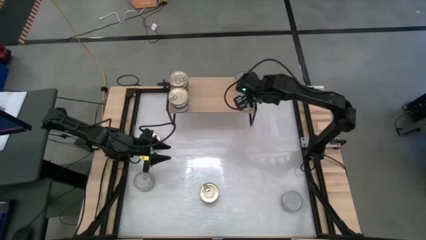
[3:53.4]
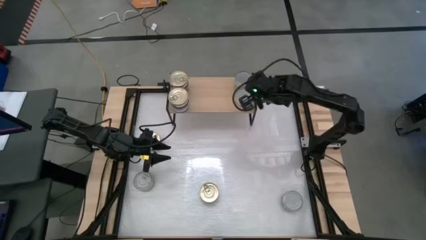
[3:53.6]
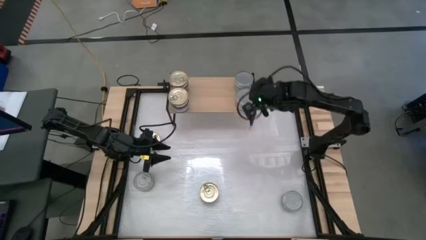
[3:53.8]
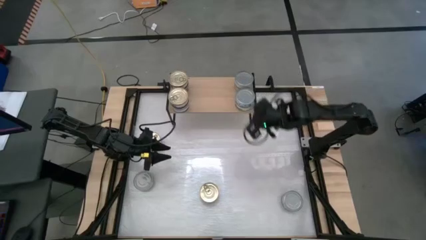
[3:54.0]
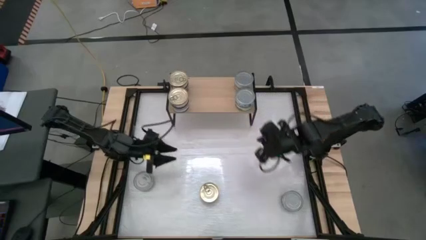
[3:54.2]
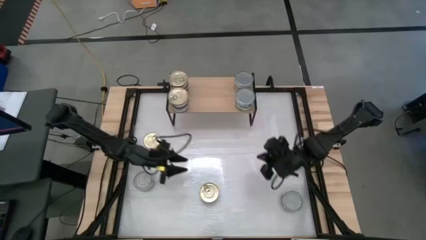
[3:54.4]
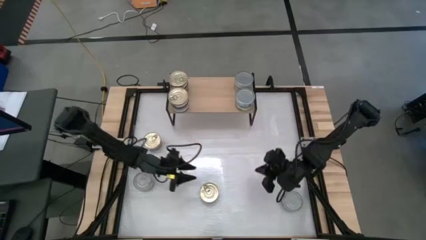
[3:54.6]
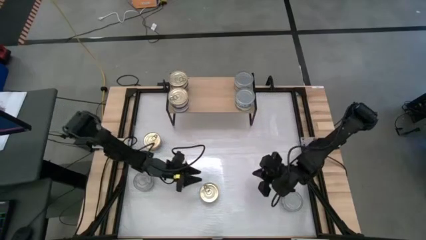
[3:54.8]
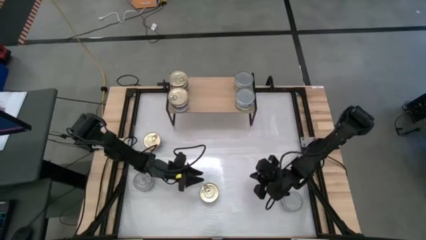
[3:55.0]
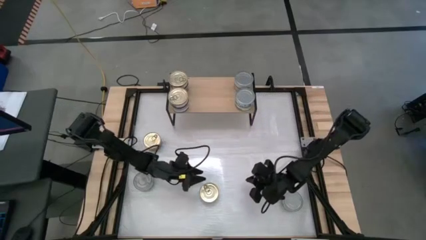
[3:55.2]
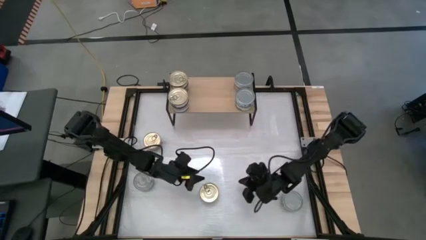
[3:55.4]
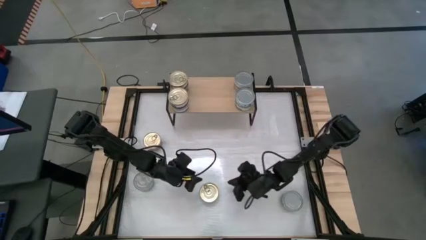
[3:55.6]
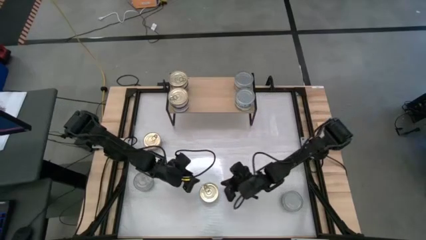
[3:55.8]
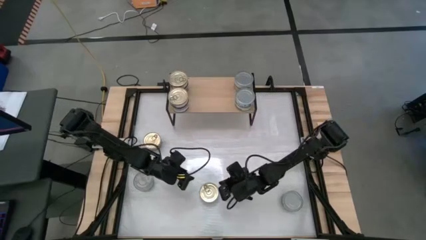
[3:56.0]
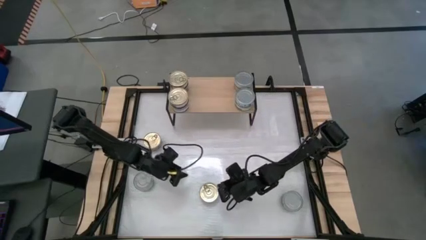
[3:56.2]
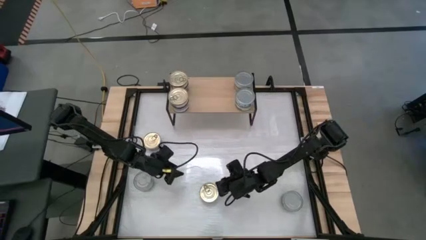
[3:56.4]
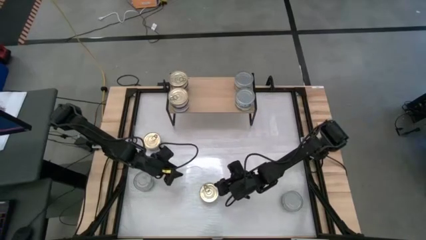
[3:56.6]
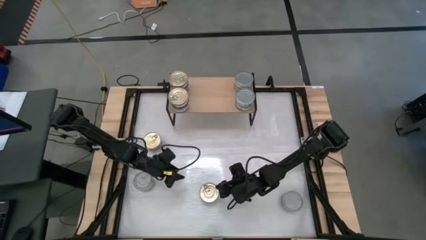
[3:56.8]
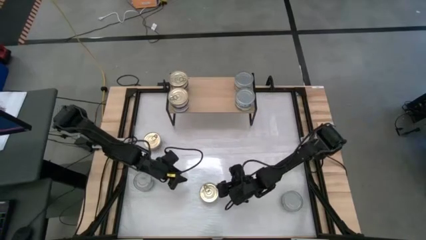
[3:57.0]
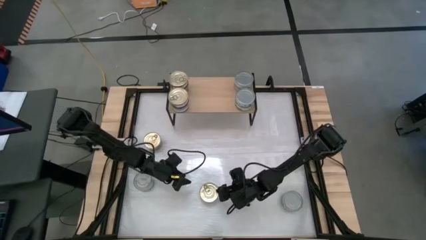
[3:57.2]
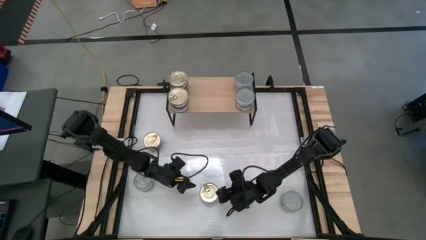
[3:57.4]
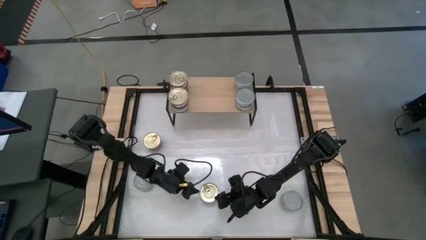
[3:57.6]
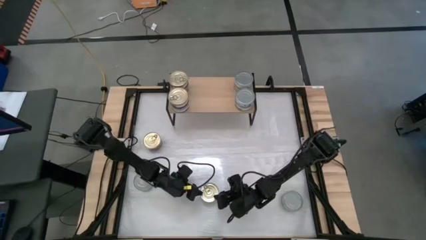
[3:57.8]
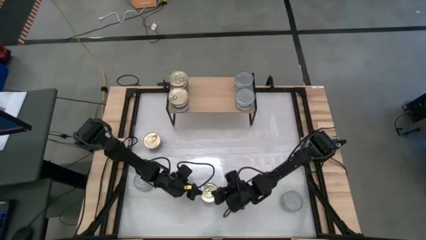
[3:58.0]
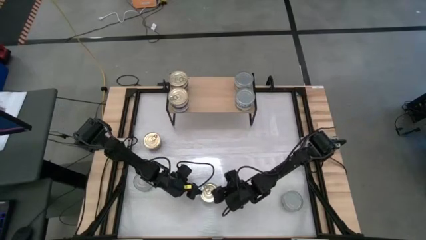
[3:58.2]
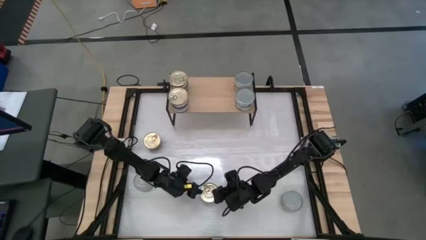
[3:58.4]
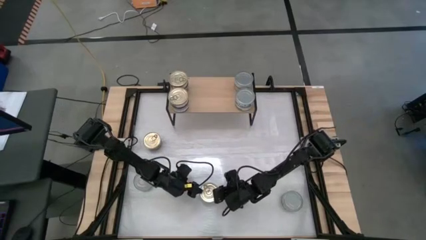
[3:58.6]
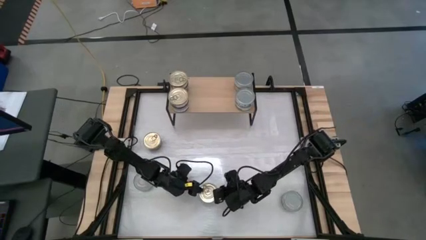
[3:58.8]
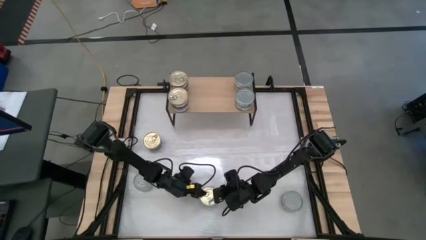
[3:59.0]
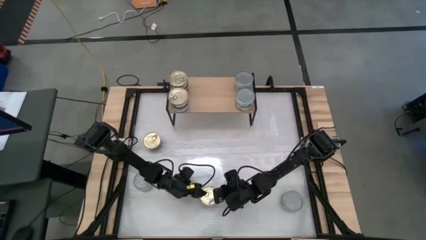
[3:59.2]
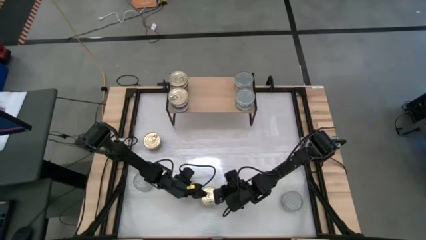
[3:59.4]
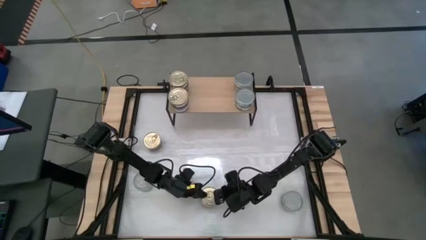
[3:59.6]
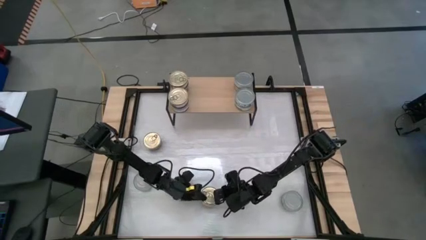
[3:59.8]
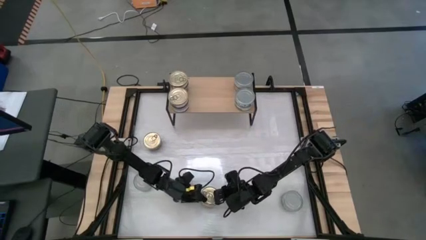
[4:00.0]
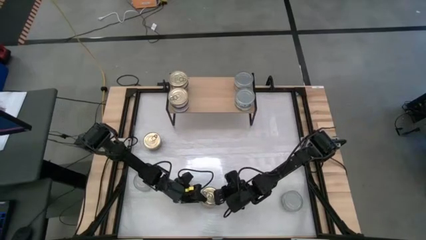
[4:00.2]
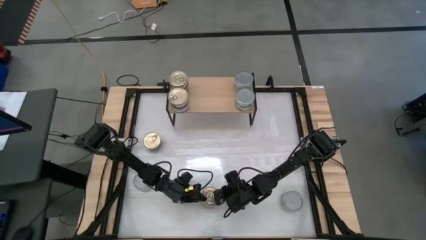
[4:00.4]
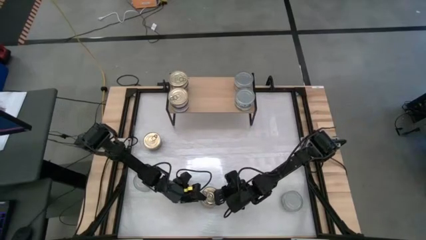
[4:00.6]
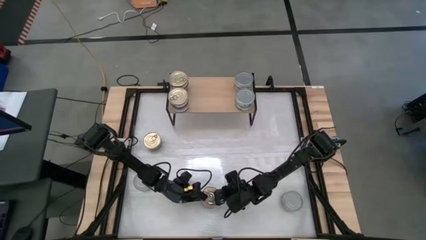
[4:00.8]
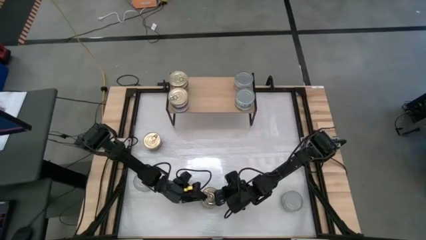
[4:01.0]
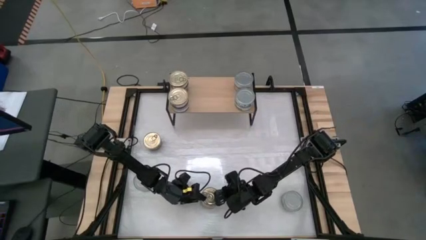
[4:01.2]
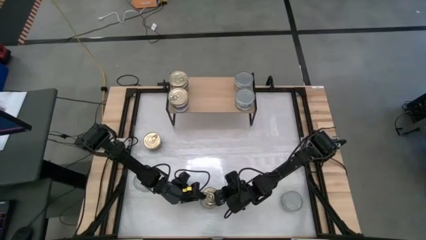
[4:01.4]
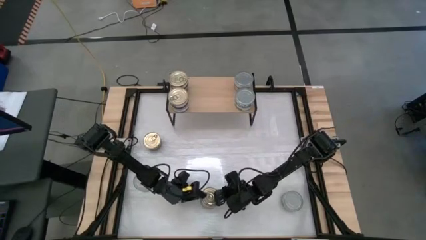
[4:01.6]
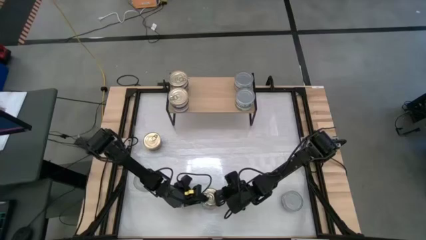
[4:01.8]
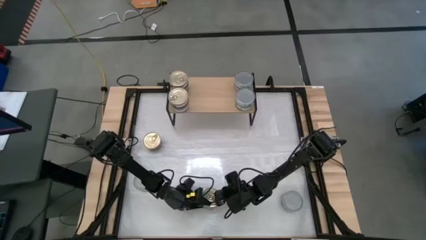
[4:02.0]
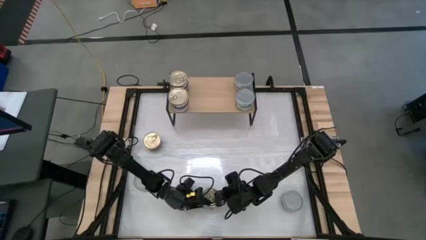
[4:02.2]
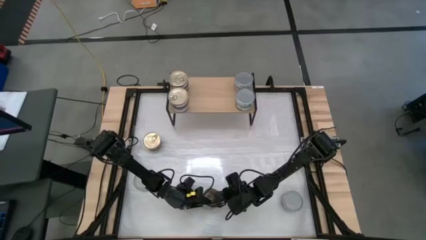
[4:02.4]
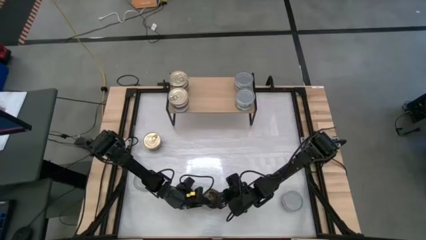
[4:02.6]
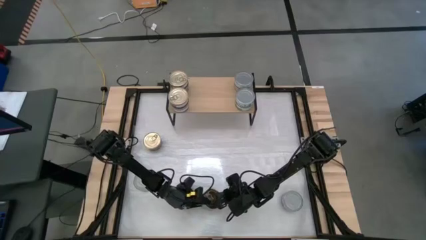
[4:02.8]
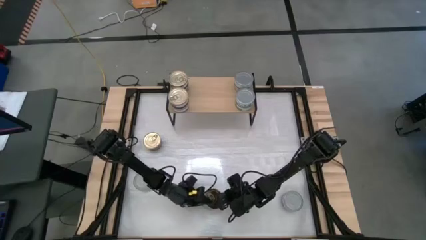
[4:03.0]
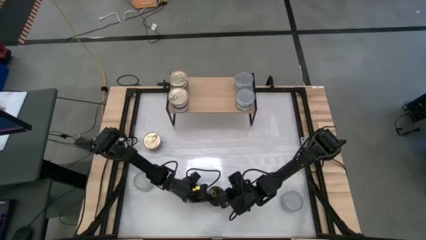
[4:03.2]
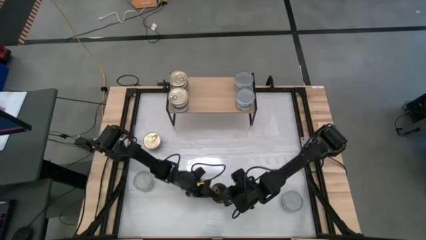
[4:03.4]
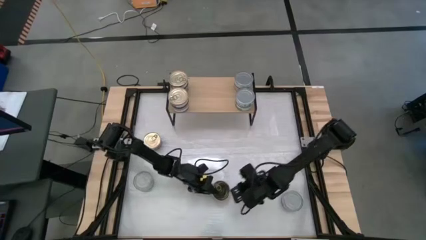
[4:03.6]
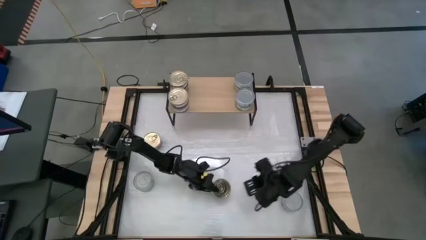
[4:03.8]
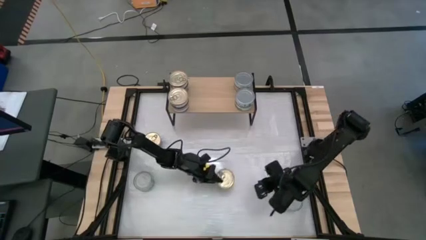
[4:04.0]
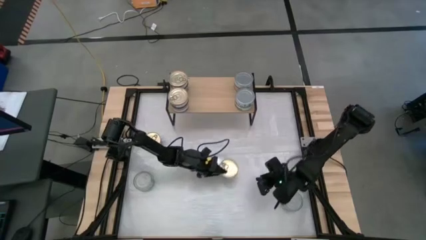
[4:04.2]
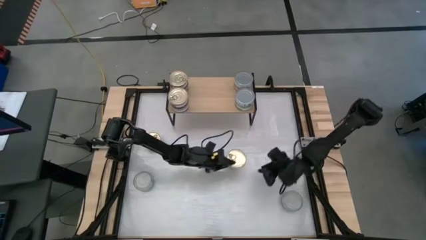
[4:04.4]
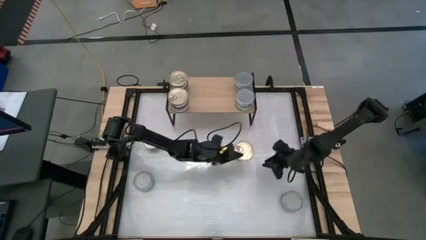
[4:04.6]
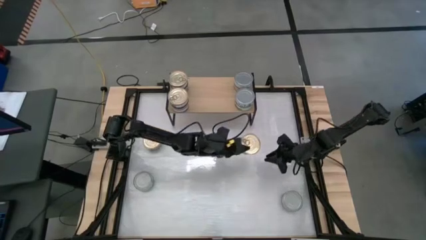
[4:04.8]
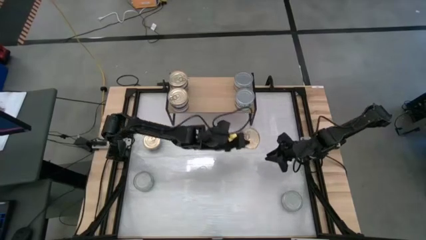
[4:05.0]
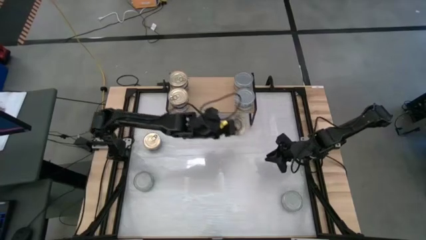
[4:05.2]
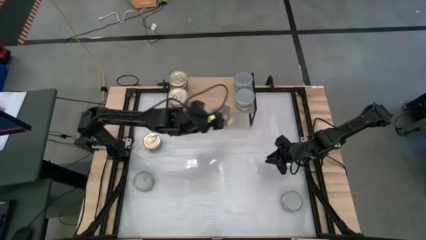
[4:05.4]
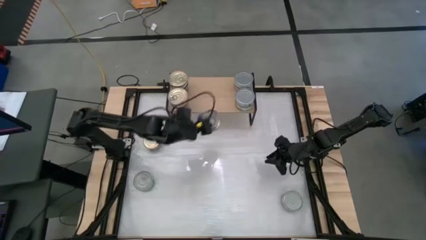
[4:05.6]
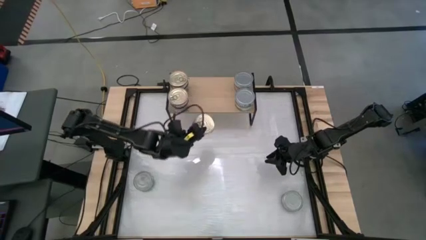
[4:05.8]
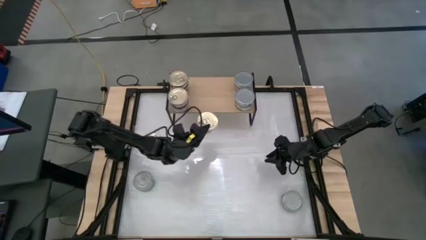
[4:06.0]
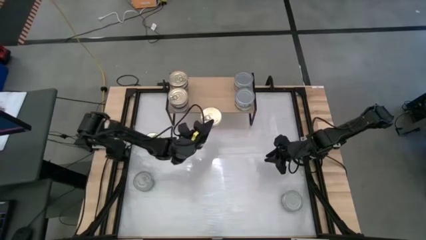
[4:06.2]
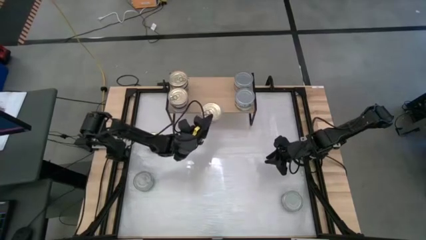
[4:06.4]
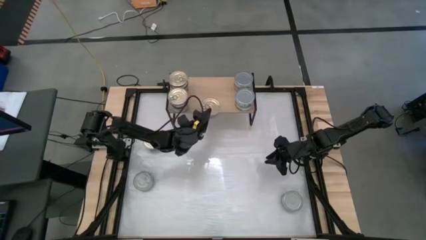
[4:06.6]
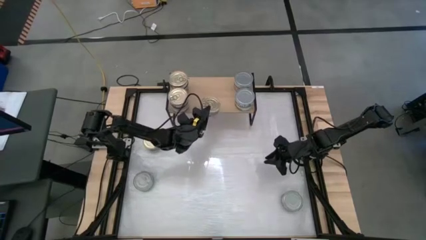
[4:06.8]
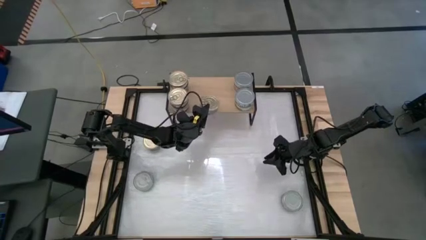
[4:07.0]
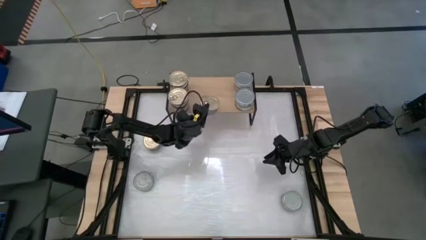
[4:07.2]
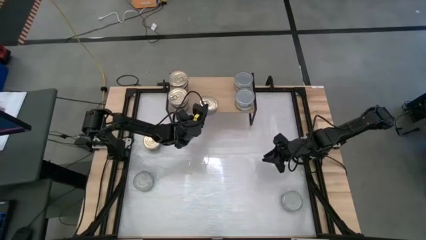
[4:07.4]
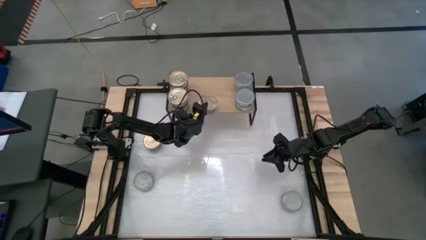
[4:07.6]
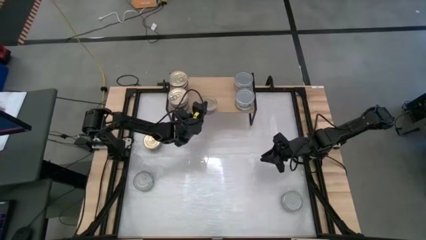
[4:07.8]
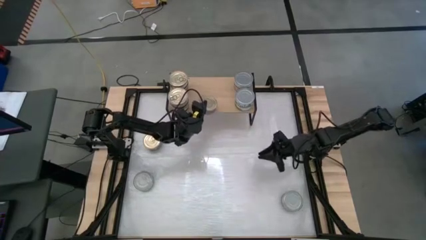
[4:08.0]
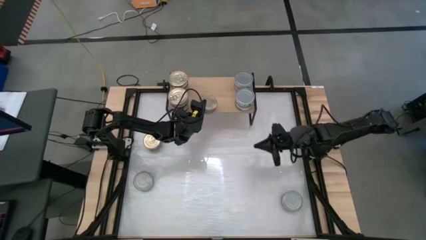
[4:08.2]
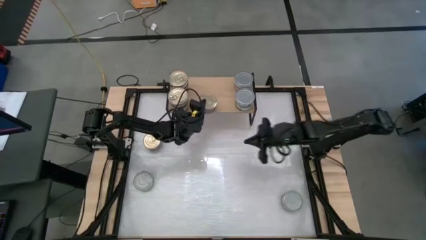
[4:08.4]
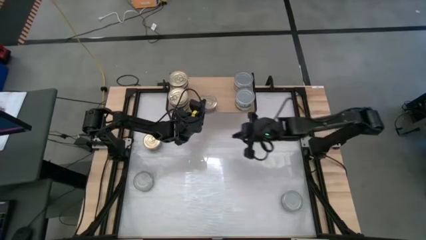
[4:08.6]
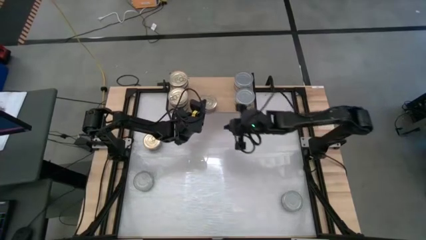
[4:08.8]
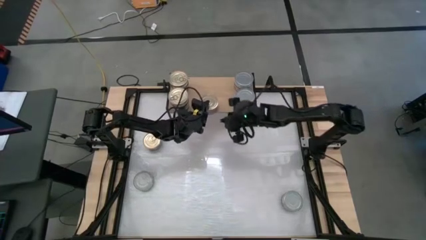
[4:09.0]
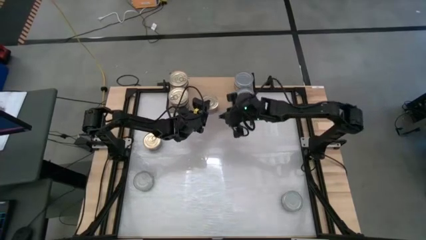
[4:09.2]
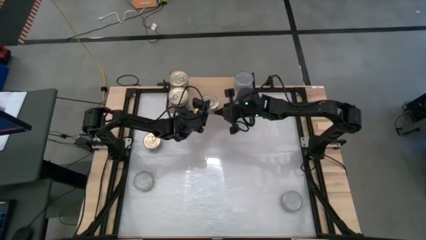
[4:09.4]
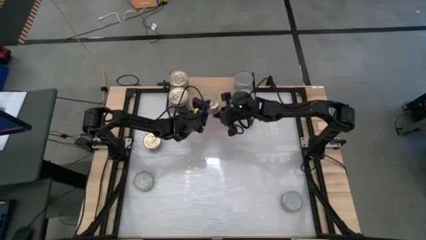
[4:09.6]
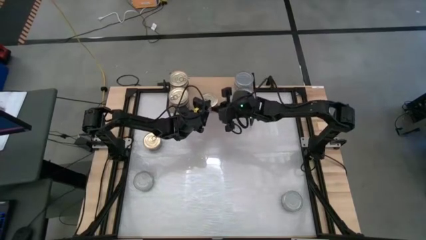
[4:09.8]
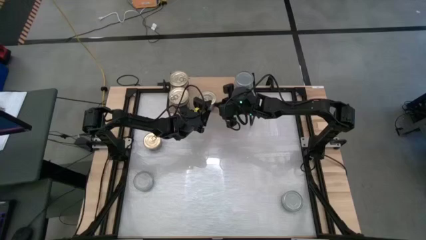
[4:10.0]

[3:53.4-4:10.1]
Task: Stack canned seafood by type on shelf
Put the blue pink tuna can on the shelf
